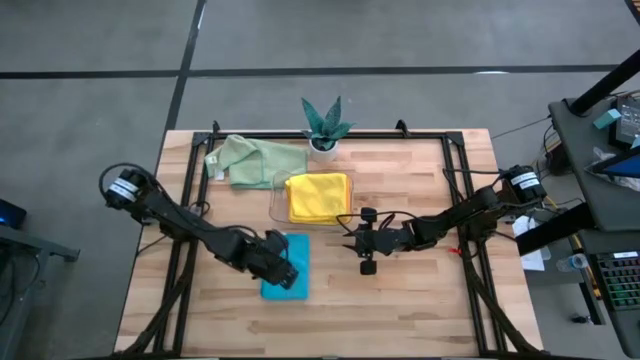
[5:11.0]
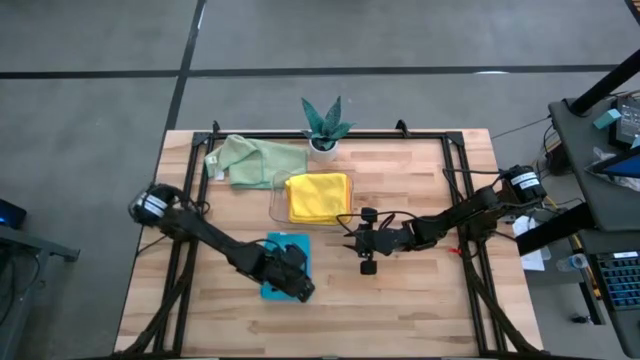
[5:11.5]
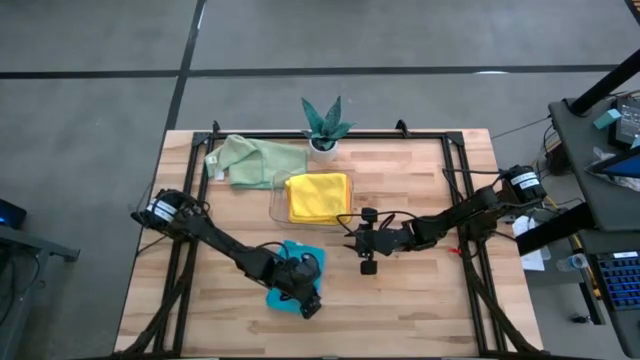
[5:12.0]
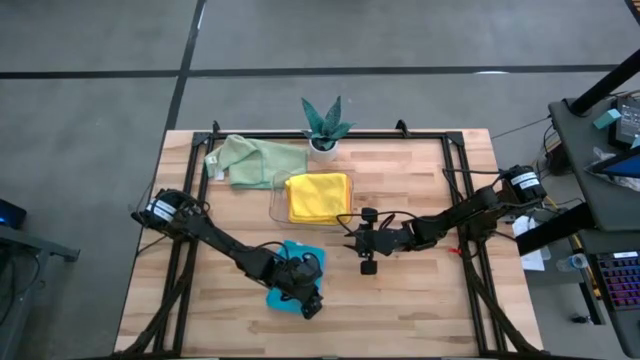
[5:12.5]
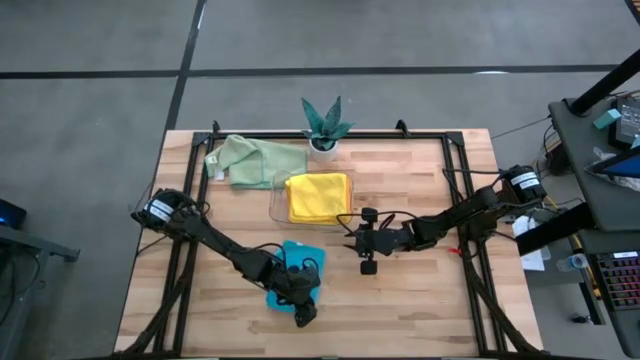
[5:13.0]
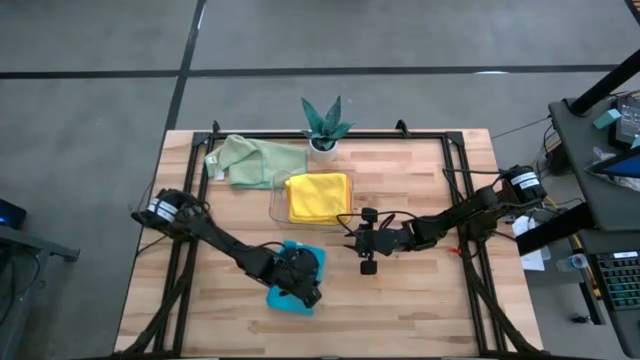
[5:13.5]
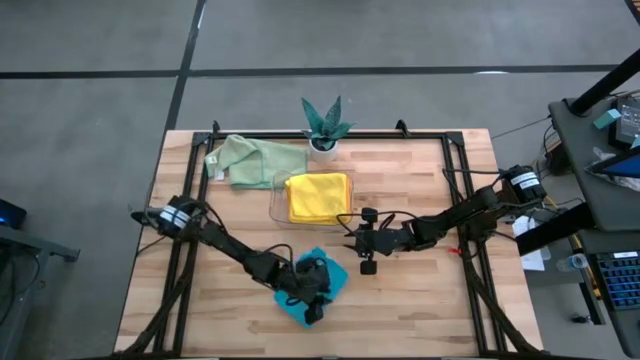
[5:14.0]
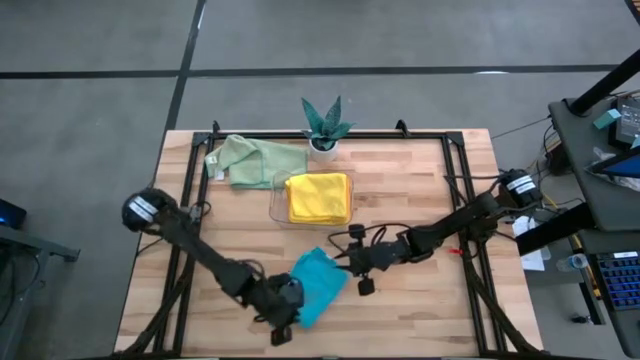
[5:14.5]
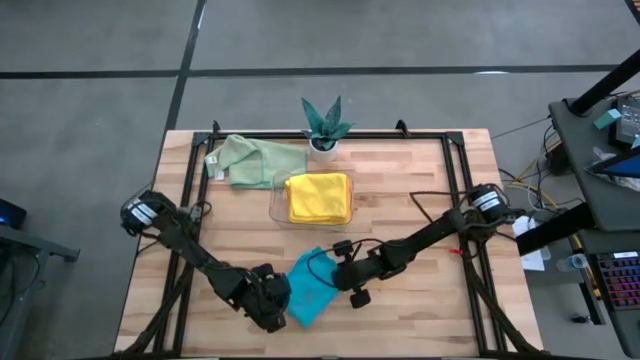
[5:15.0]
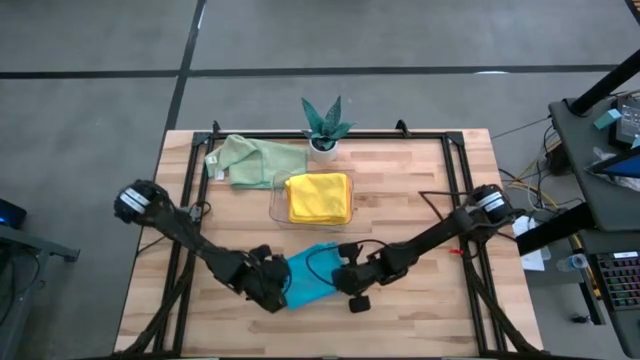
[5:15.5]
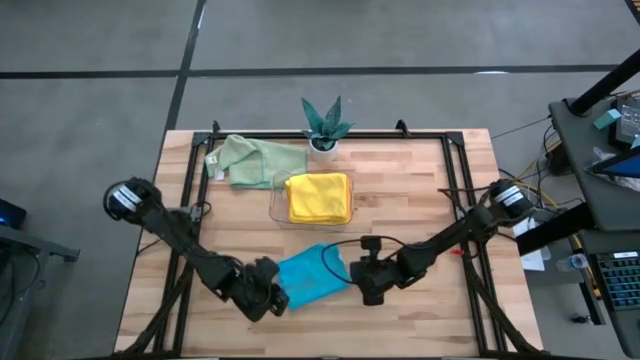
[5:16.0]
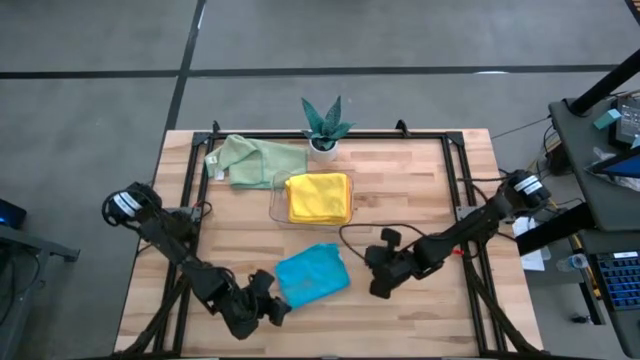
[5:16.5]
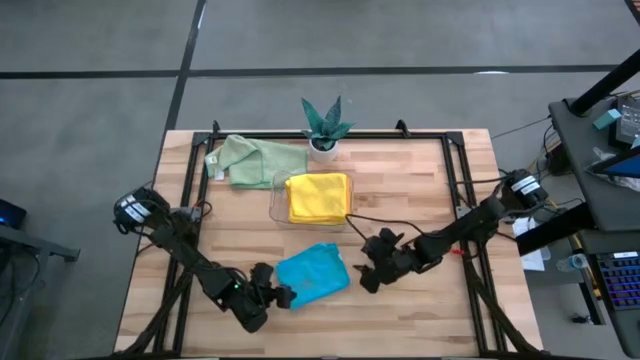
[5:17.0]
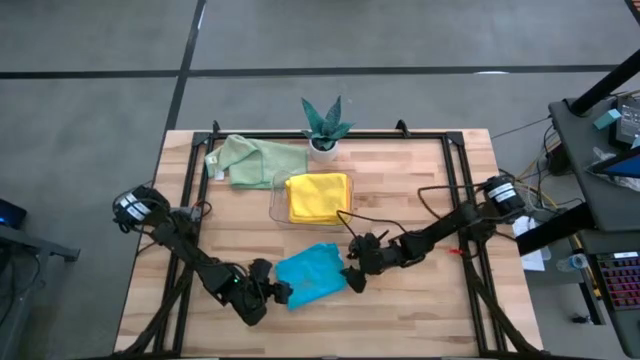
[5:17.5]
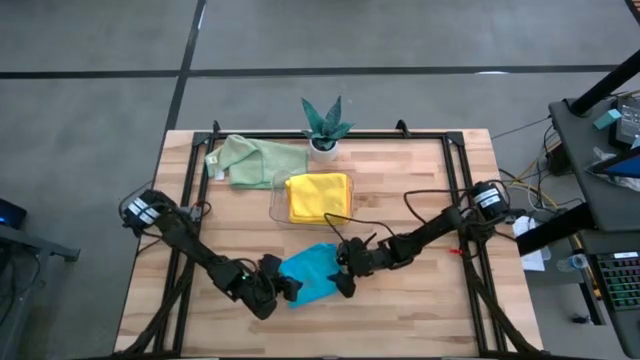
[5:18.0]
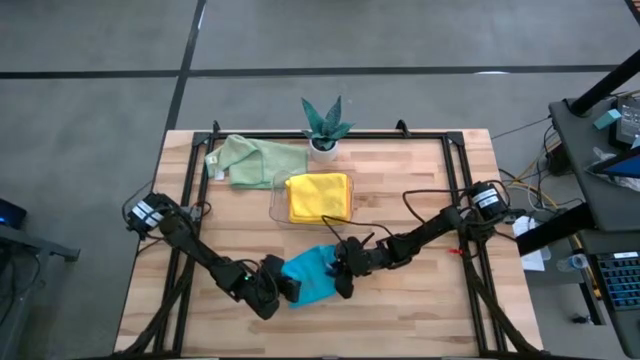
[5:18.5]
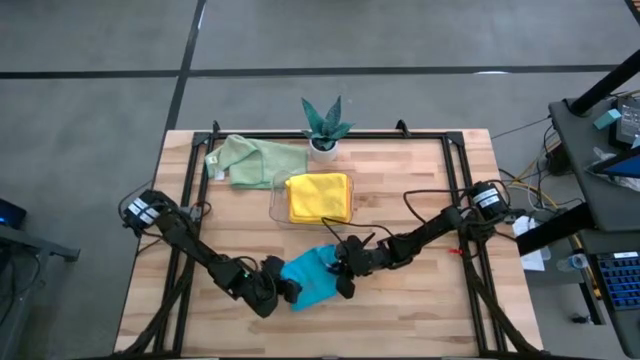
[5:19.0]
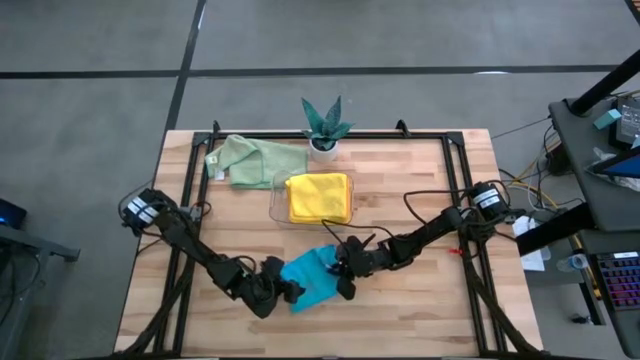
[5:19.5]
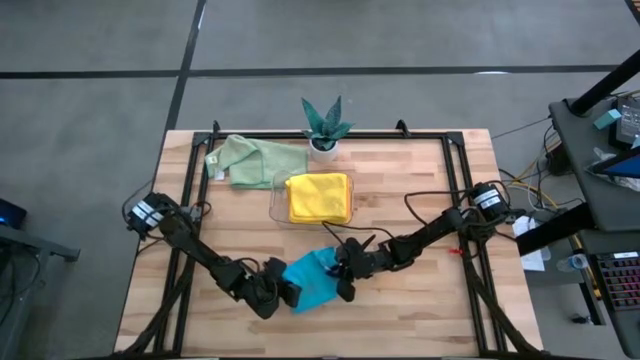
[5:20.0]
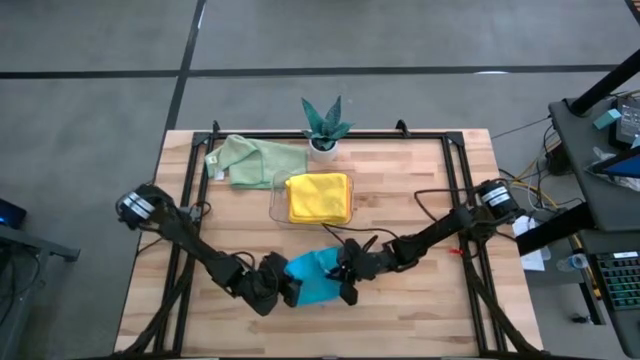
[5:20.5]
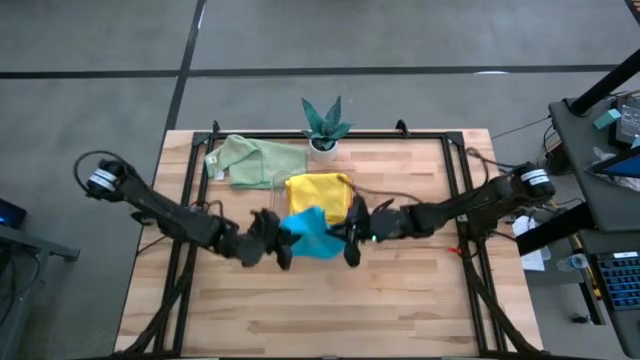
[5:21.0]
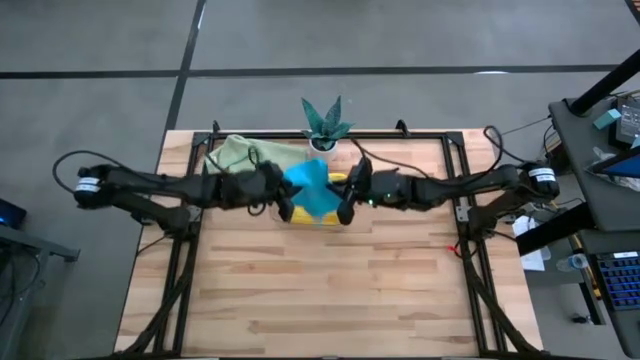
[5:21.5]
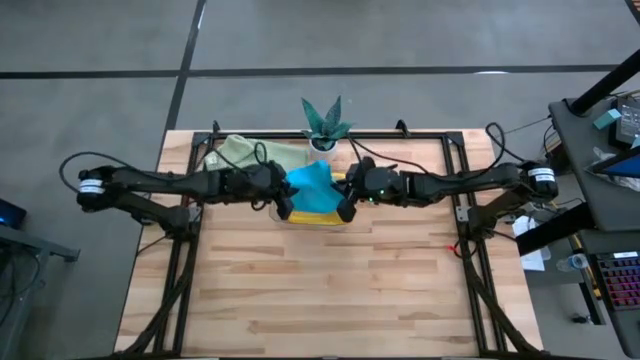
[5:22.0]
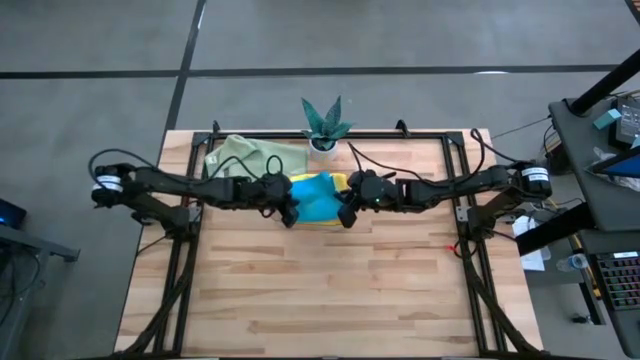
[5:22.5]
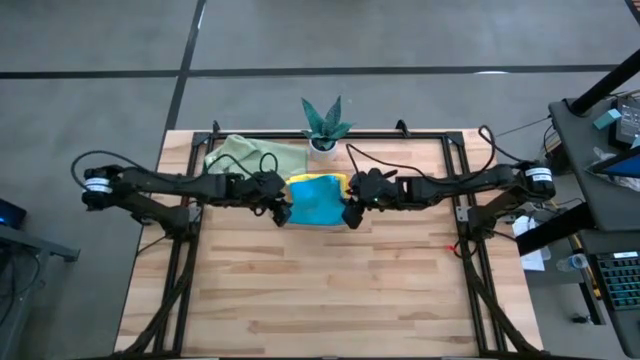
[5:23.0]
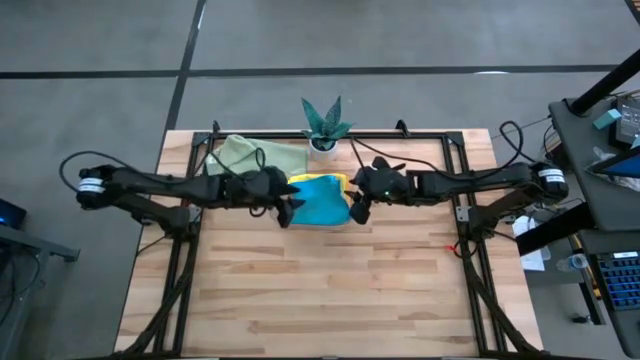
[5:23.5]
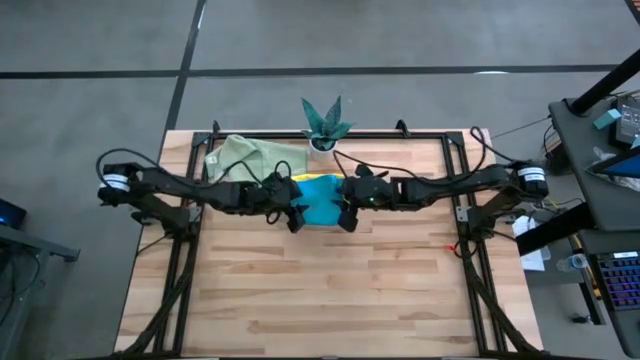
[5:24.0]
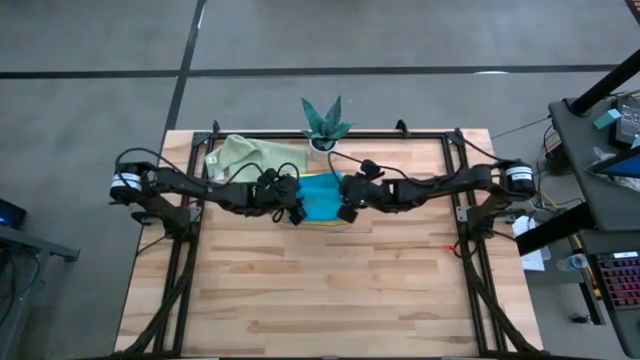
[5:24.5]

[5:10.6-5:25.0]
Task: Fold microfiber towels
Put the blue folded microfiber towel into the transparent bin
